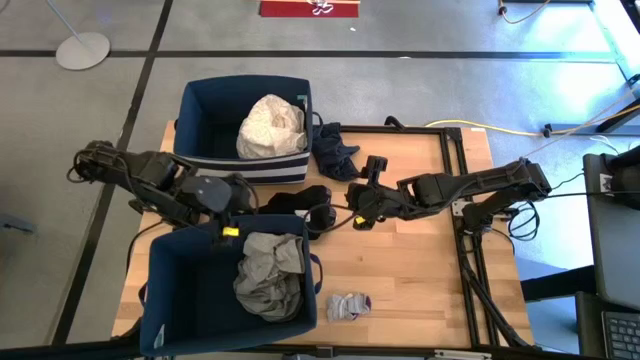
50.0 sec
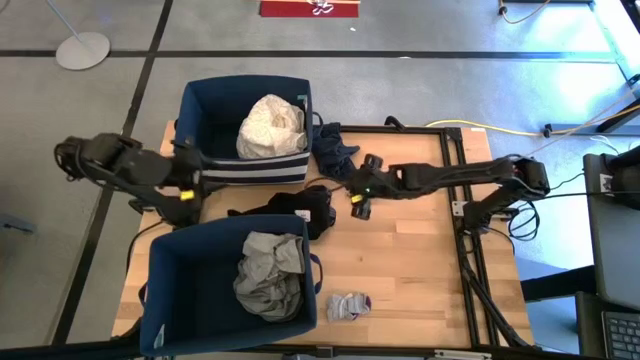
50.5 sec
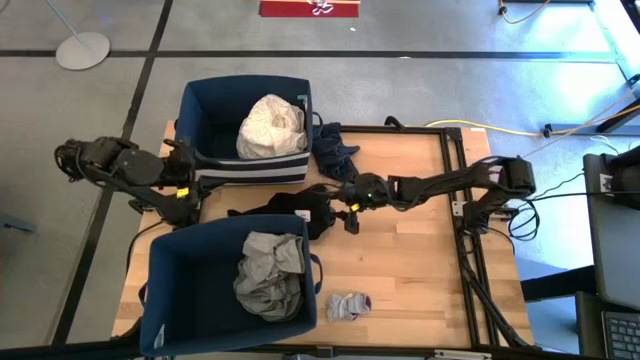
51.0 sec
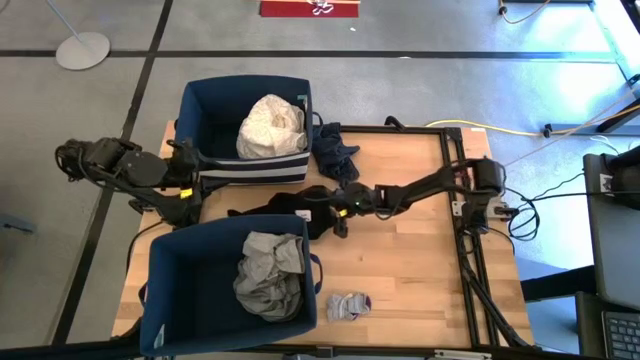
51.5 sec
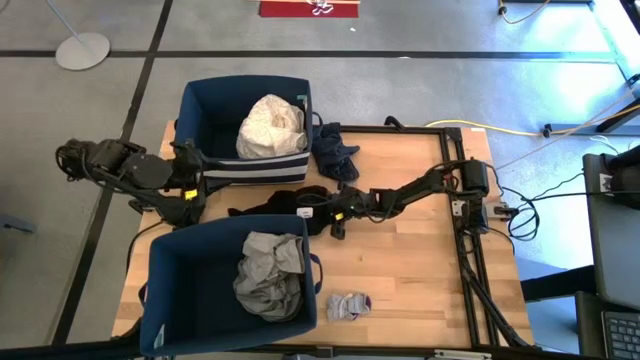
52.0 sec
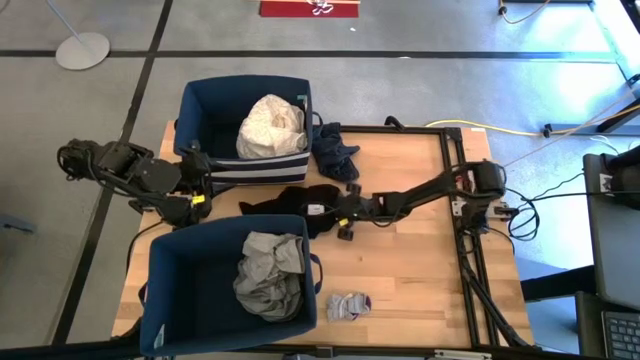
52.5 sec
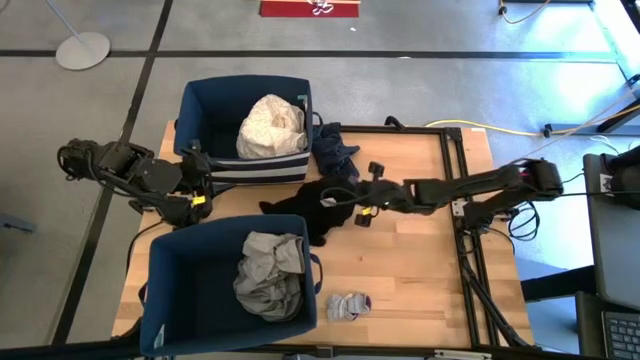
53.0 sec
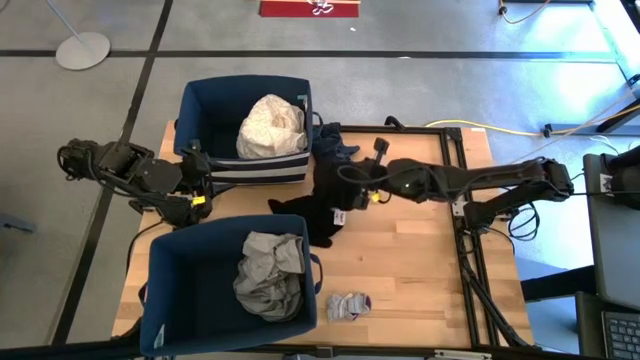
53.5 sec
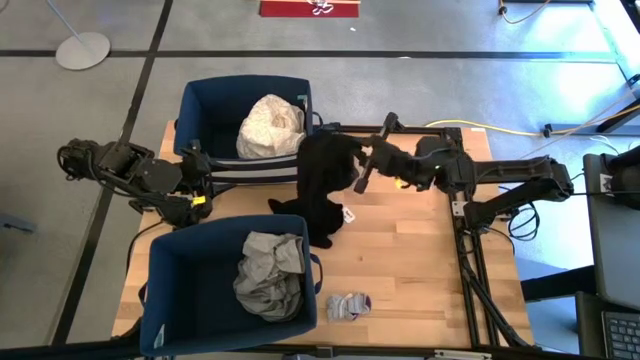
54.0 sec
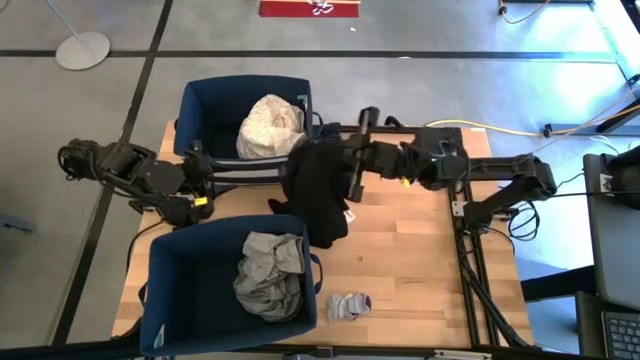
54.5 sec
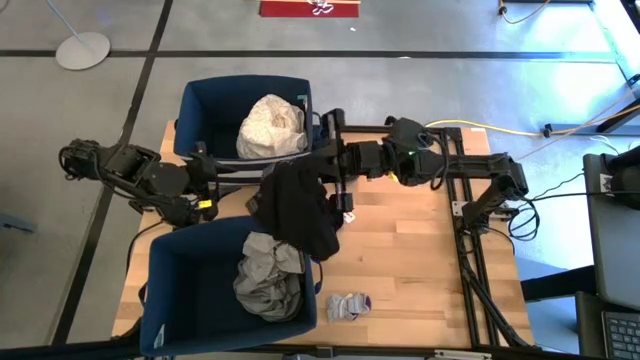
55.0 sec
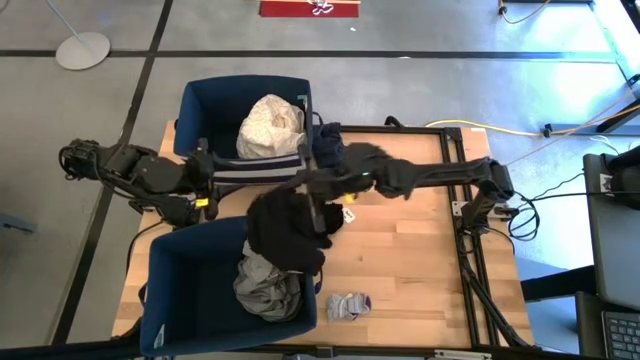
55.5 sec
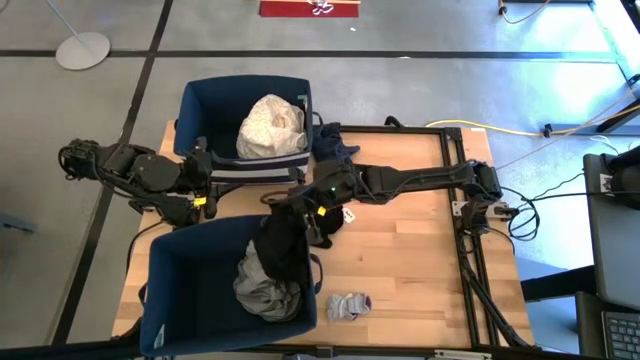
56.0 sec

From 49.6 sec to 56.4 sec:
Task: Sort clothes
Put the black underwear into the bottom blue laundry organizer

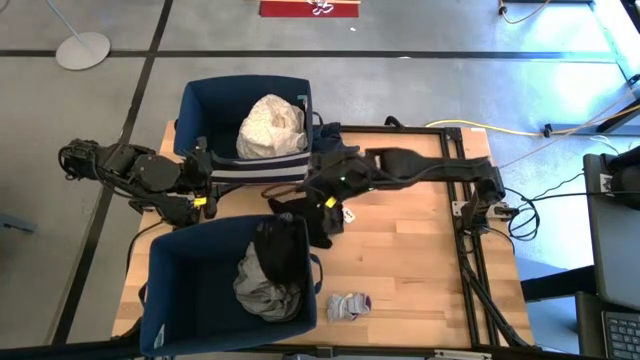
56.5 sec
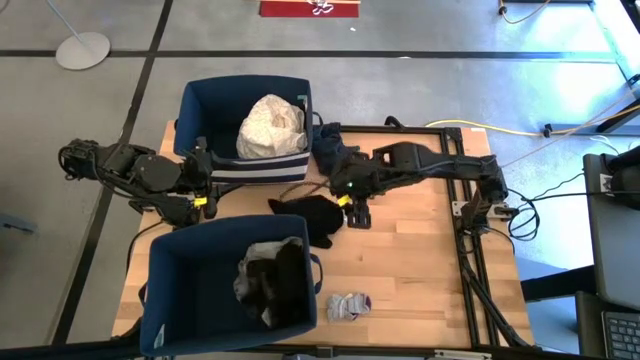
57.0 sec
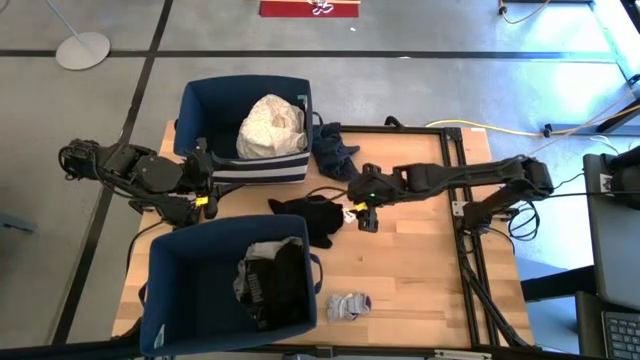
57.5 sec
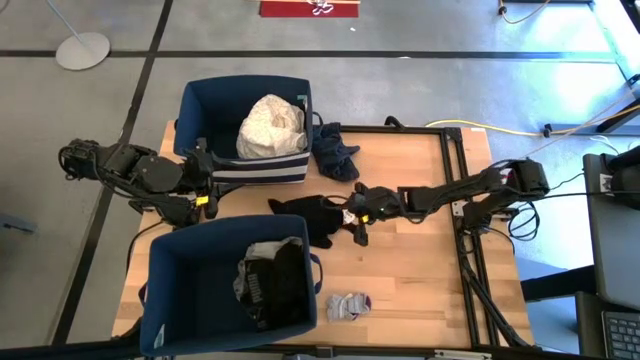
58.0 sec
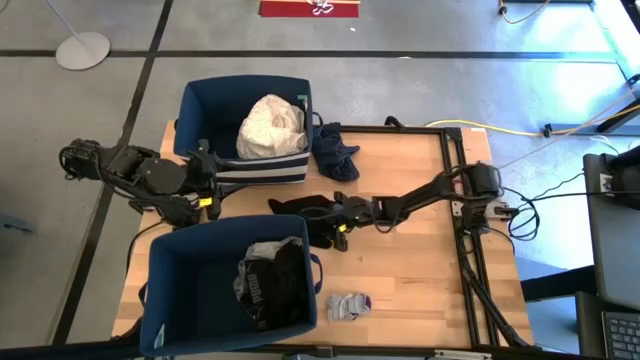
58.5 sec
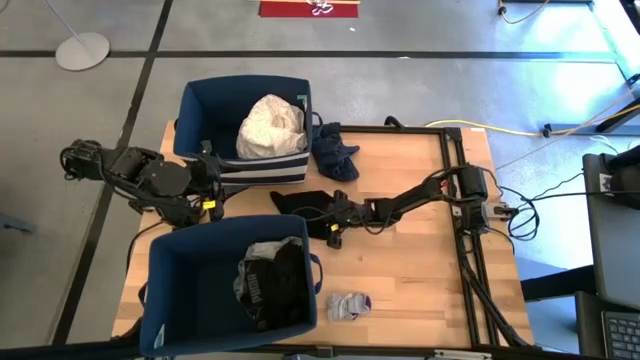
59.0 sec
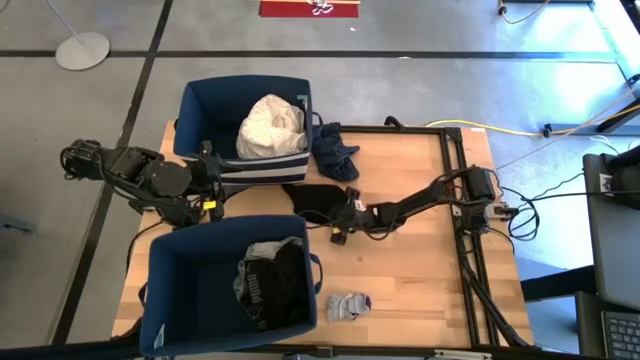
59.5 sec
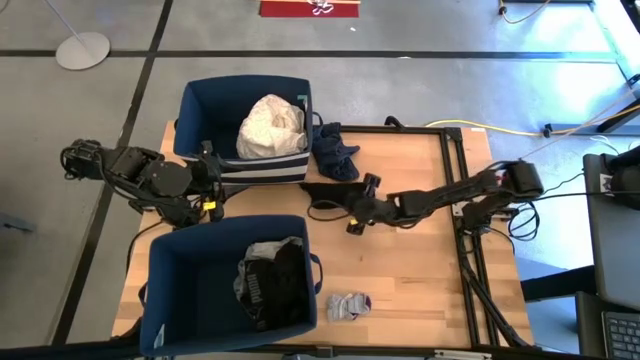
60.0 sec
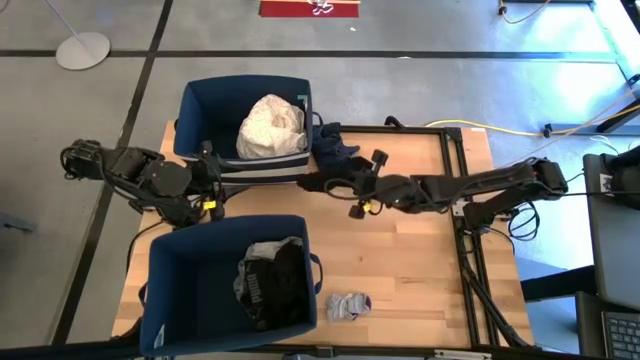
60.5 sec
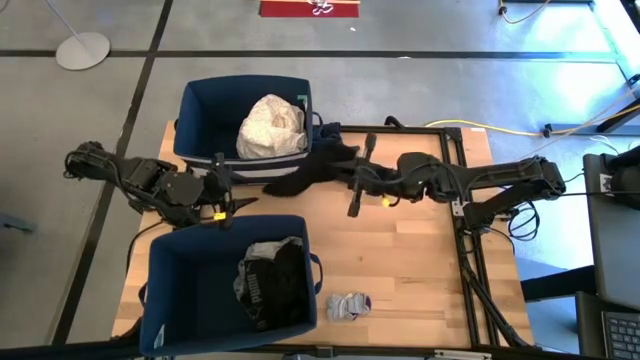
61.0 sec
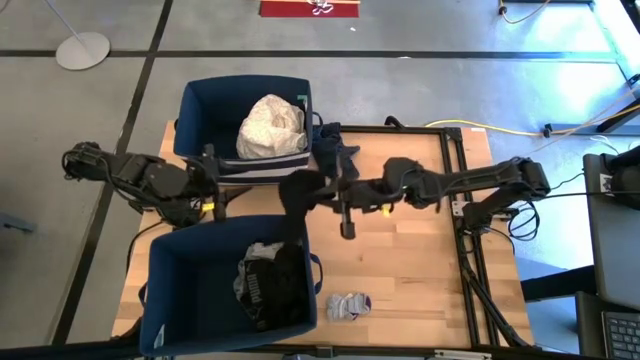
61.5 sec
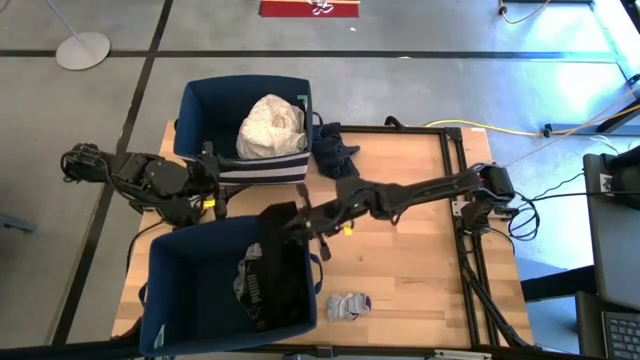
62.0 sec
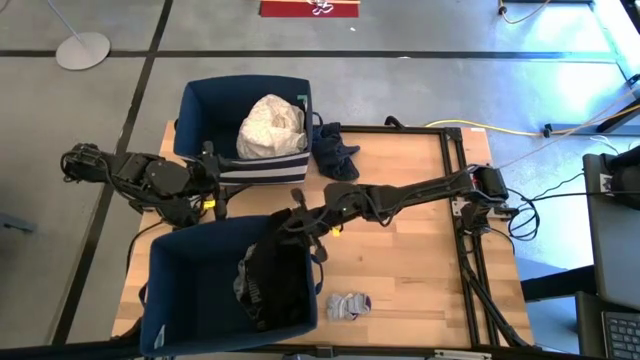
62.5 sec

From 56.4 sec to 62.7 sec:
Put the black shorts into the bottom blue laundry organizer

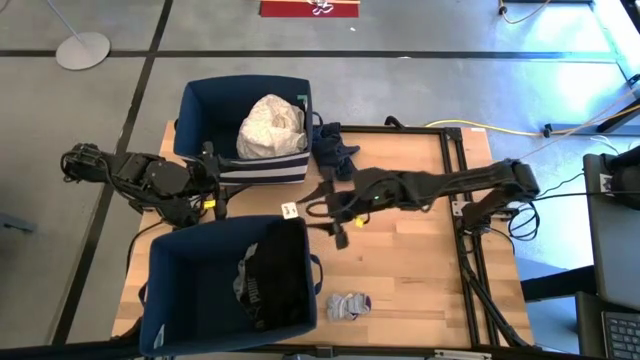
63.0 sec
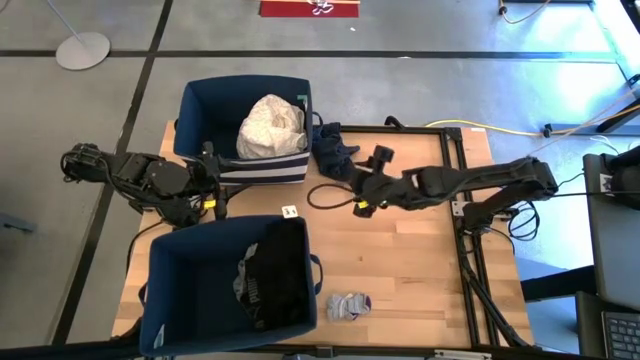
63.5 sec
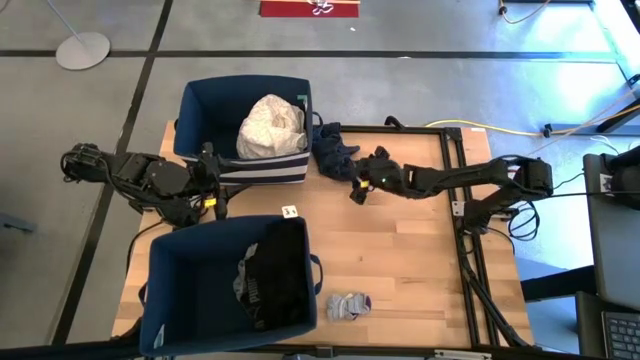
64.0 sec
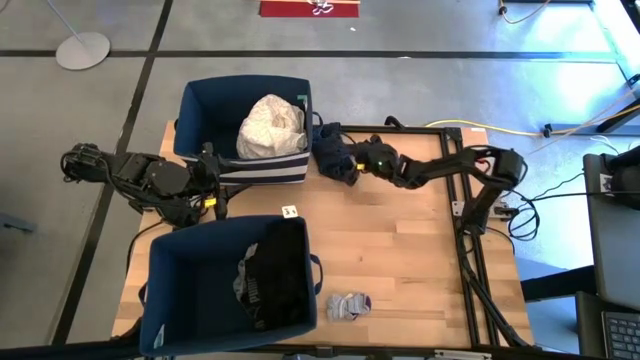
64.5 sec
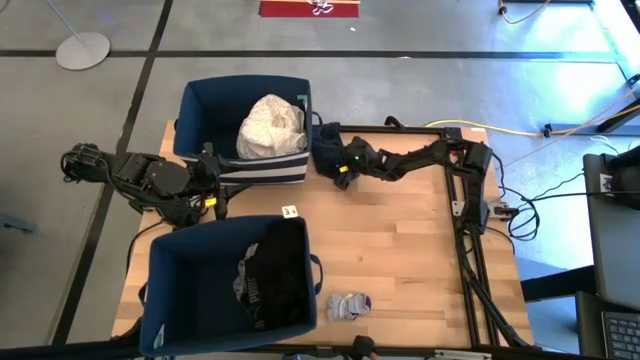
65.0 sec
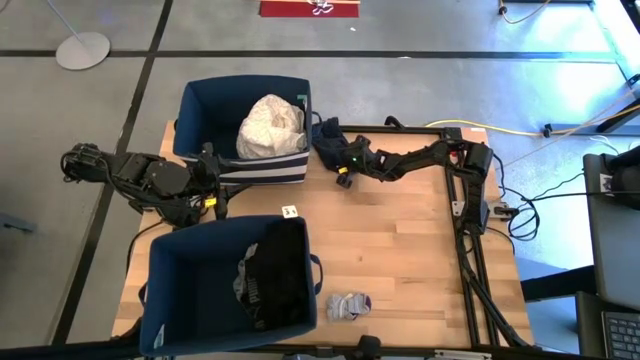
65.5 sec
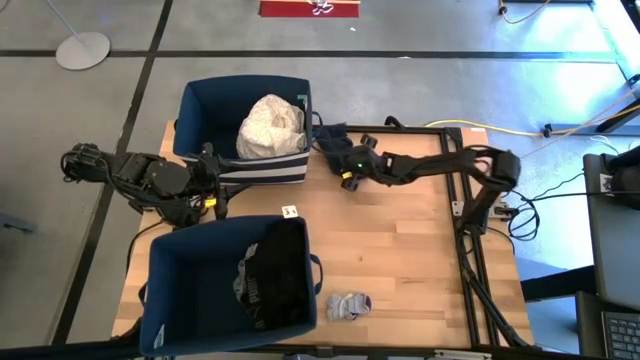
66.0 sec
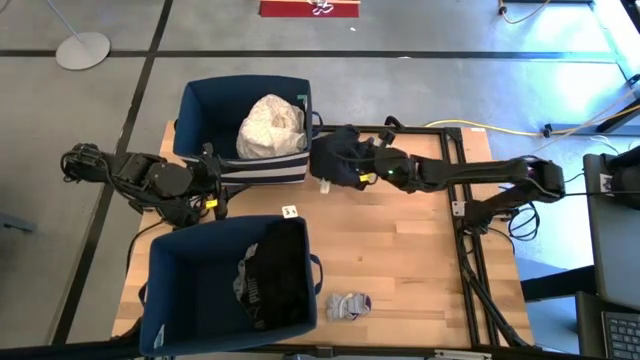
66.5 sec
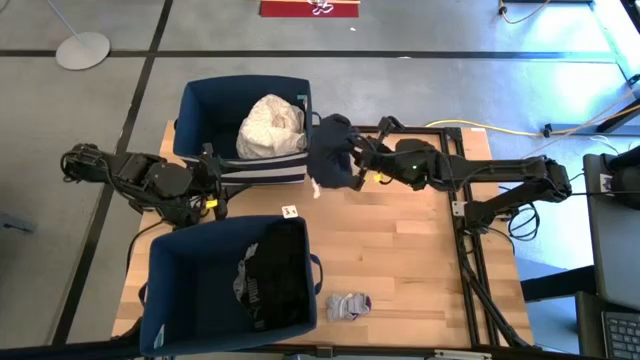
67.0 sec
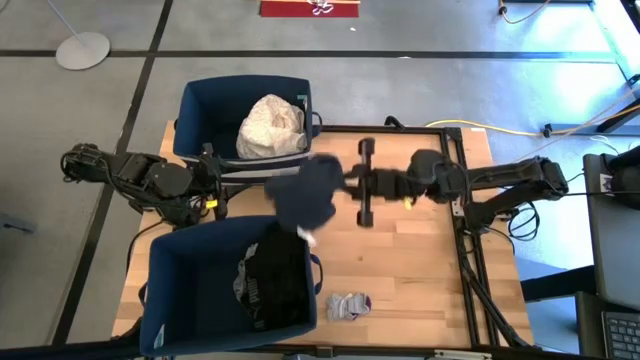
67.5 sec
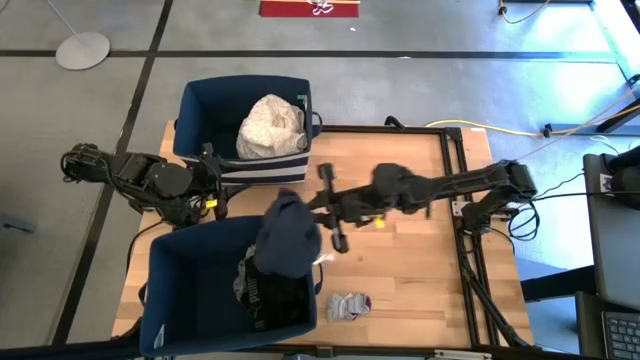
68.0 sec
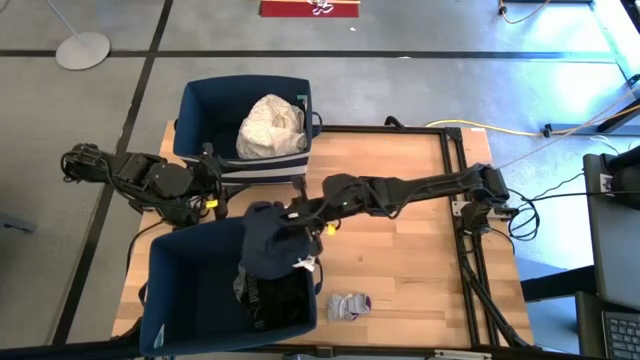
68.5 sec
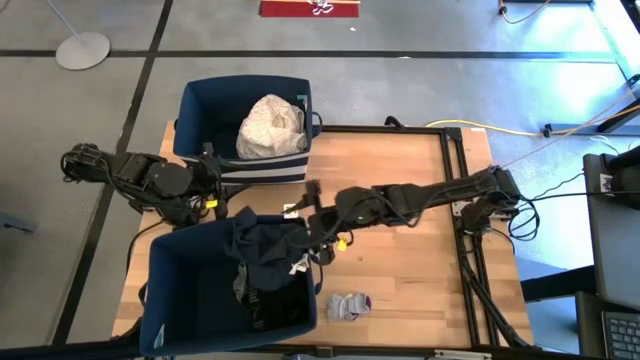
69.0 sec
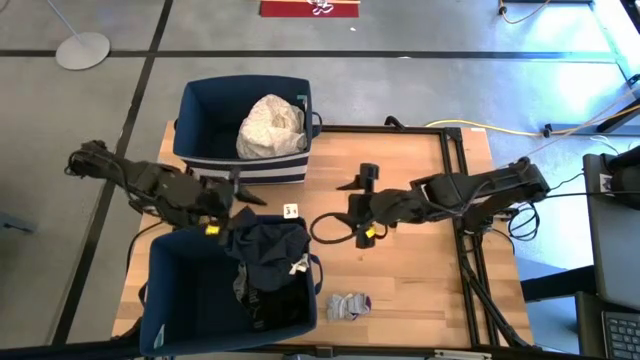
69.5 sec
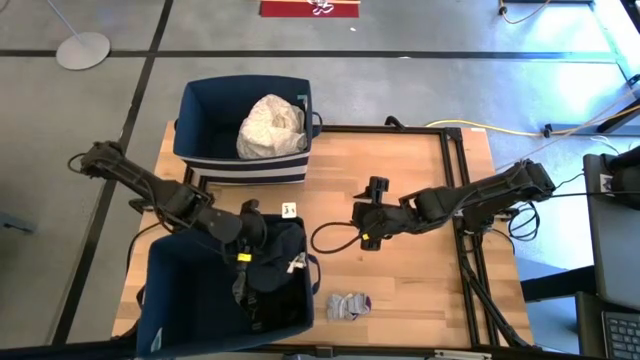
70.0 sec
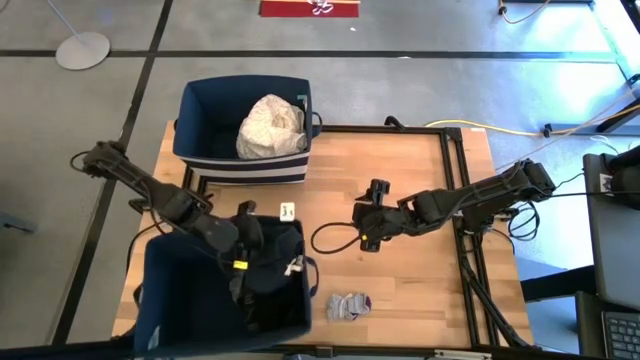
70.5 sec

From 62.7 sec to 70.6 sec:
Put the blue shorts into the bottom blue laundry organizer

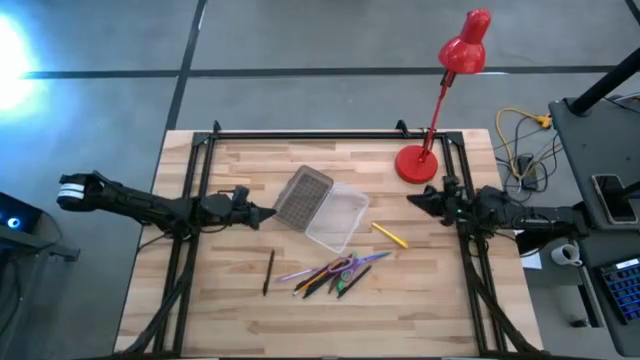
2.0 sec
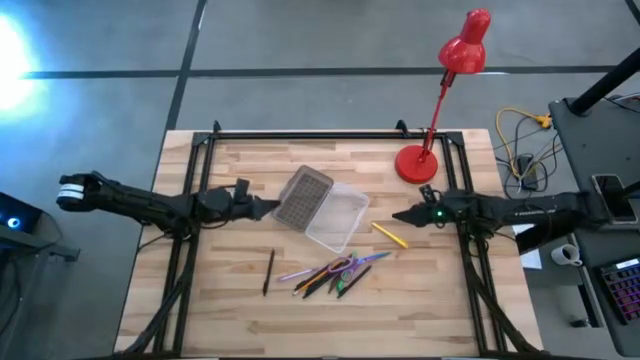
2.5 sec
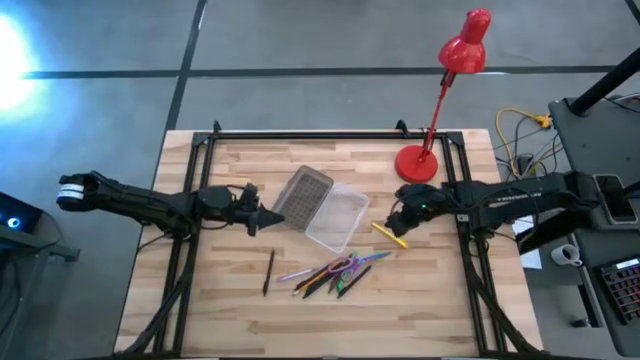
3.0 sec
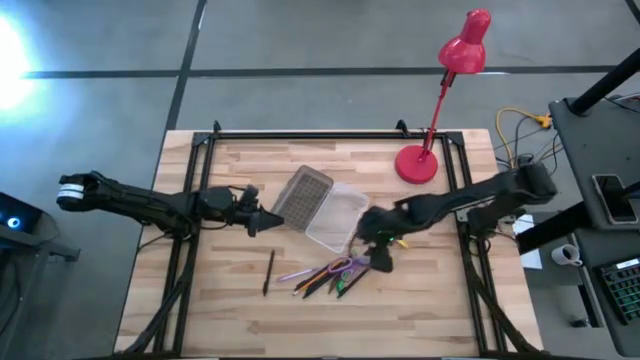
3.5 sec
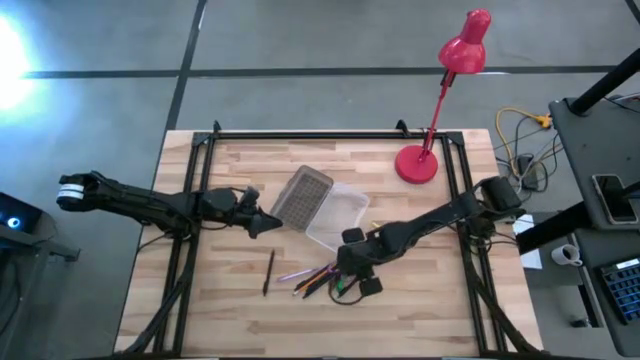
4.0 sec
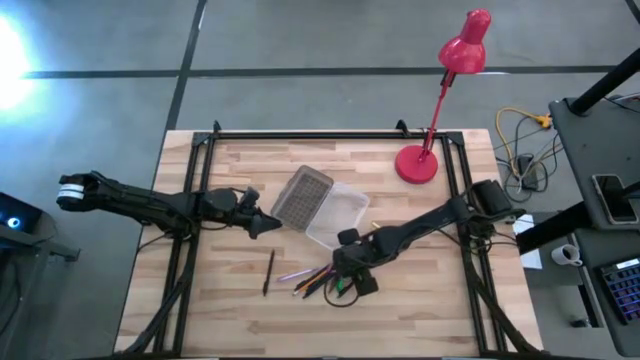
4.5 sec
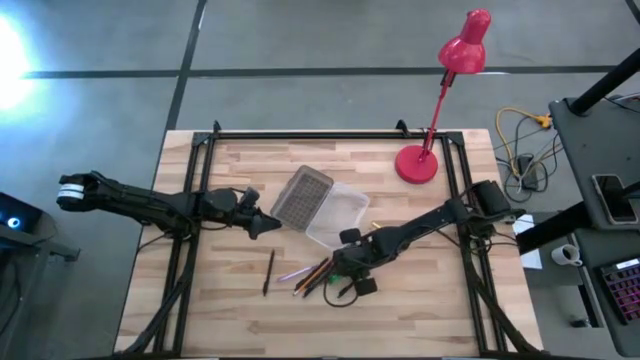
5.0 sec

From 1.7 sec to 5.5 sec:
Task: Pick & place school supplies into a supply box
Put the purple scissors into the gray supply box
